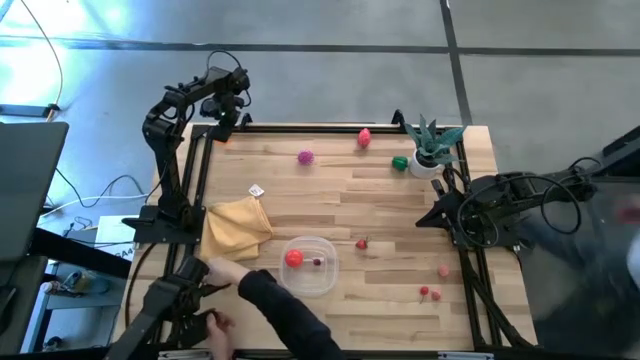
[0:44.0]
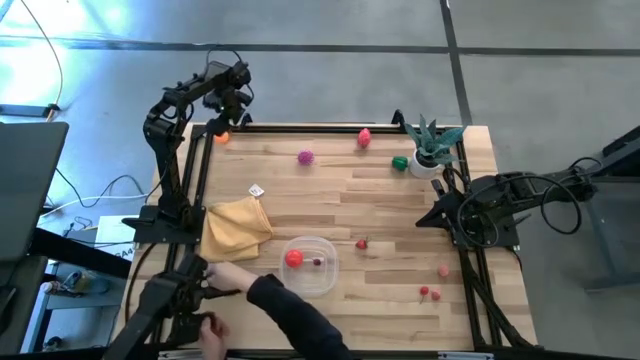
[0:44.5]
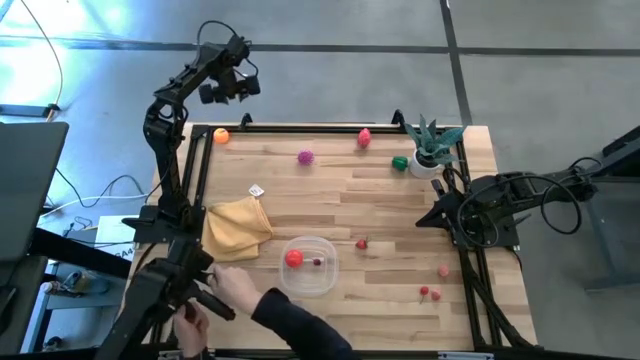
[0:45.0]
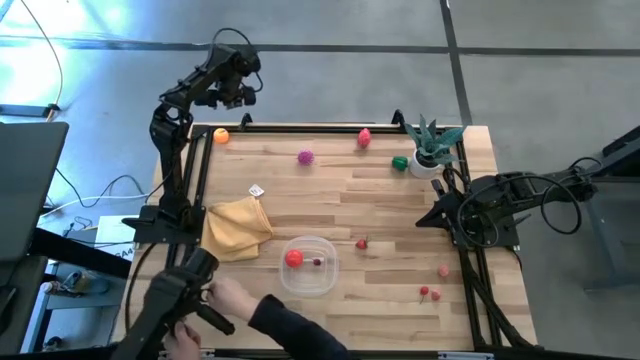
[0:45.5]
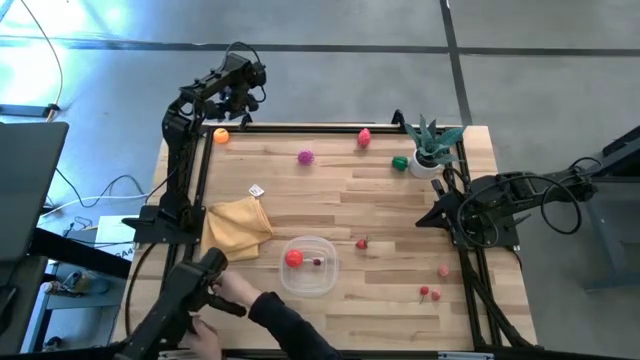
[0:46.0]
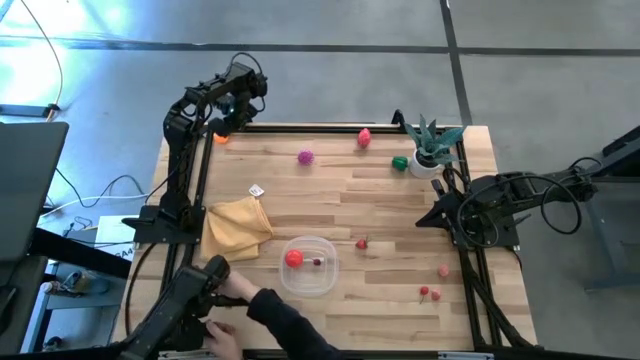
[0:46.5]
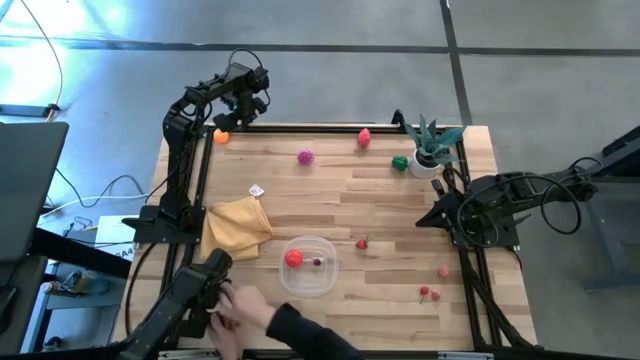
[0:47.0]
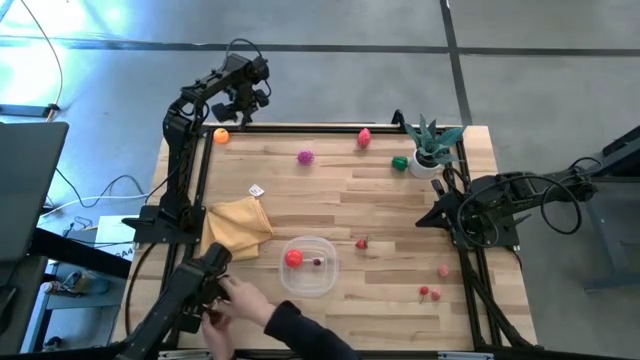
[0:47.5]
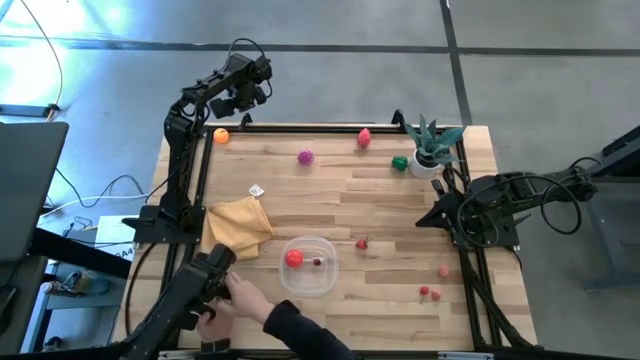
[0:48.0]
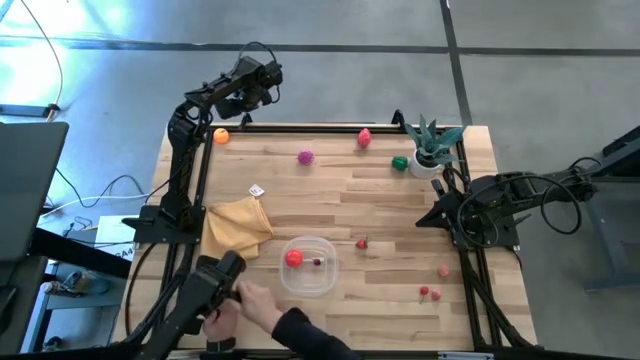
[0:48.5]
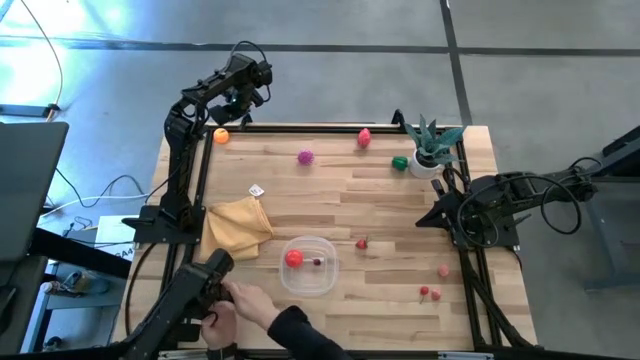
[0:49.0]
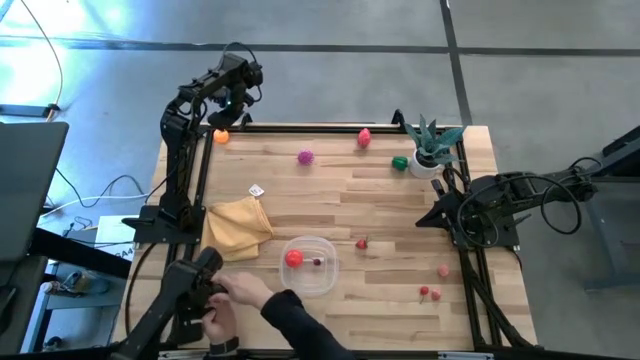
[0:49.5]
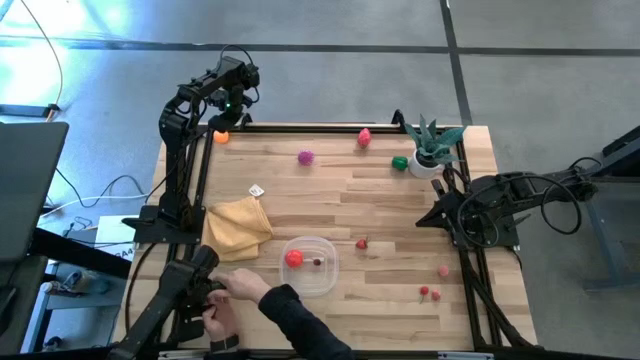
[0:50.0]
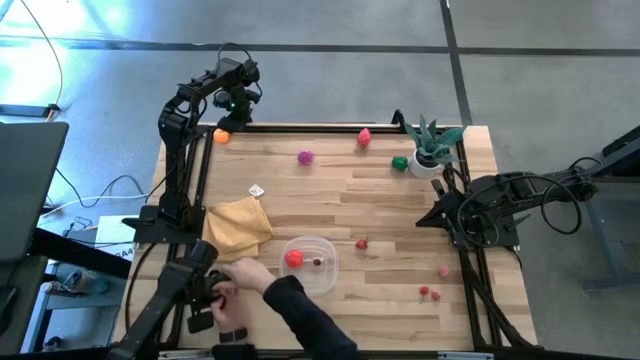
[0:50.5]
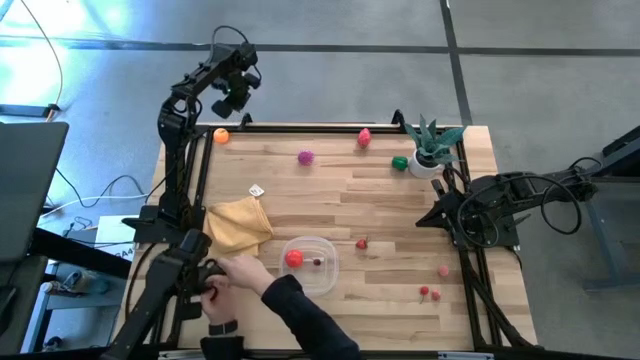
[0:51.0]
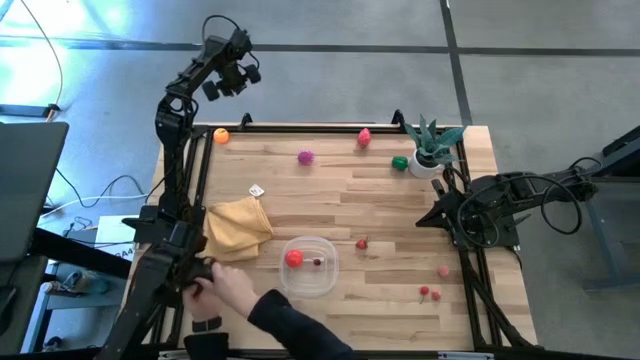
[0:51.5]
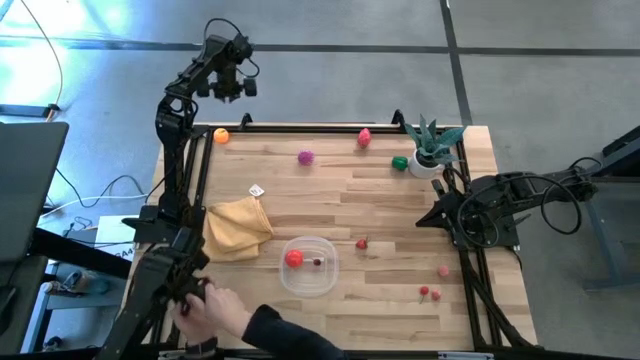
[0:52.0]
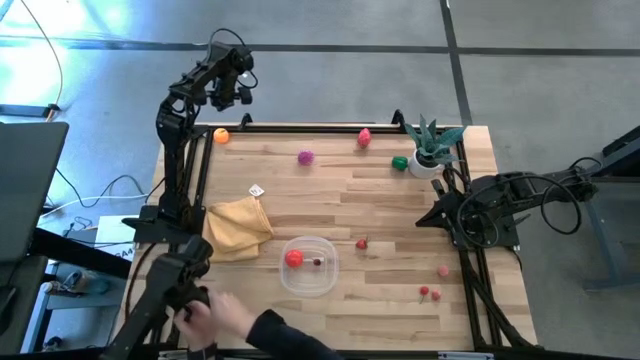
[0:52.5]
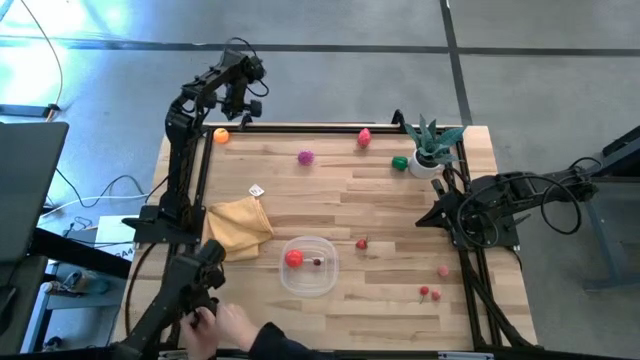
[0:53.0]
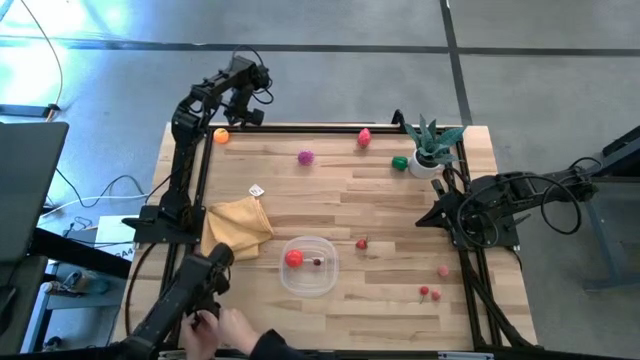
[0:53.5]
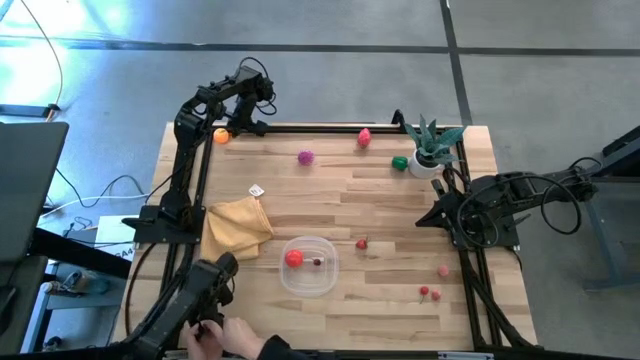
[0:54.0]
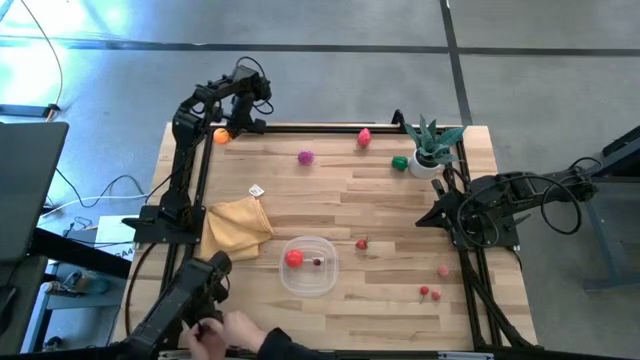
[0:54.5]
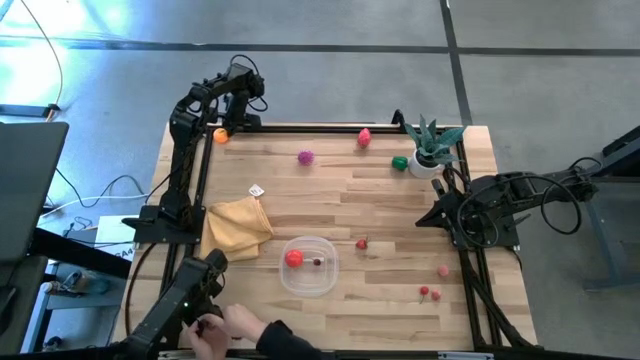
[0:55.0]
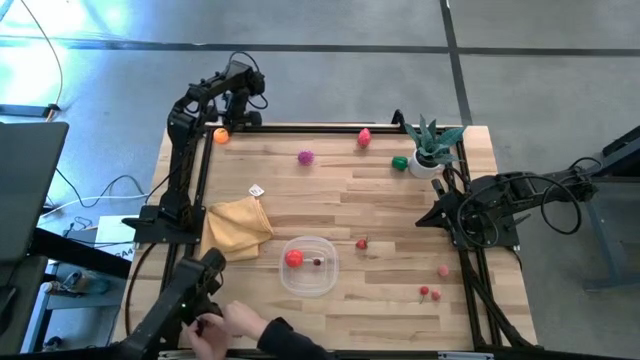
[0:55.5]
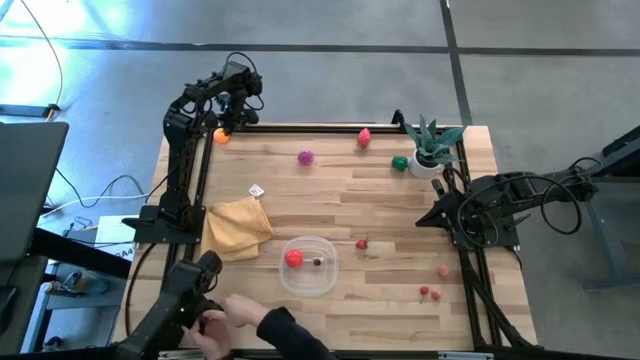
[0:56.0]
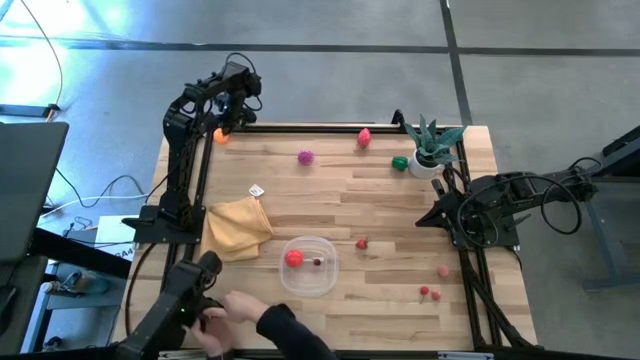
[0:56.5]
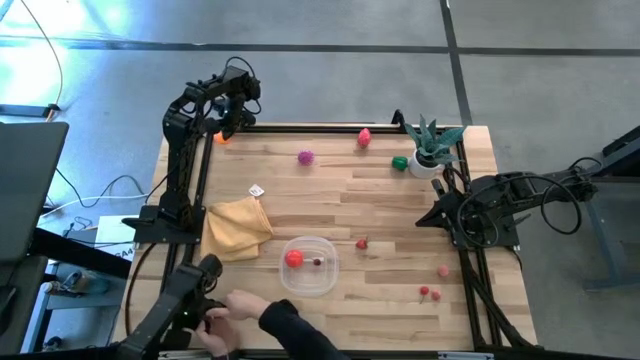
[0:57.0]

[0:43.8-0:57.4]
Task: Pick and placing Produce into tupperware
Put the orange into the transparent bin

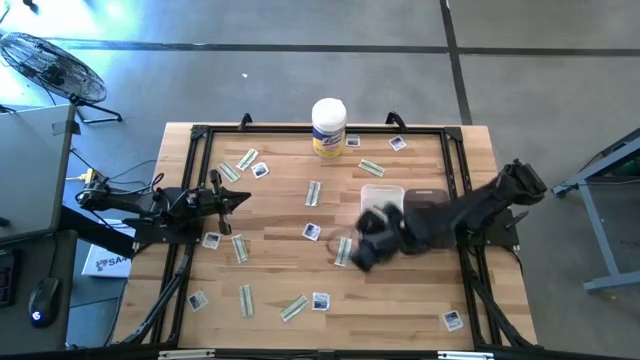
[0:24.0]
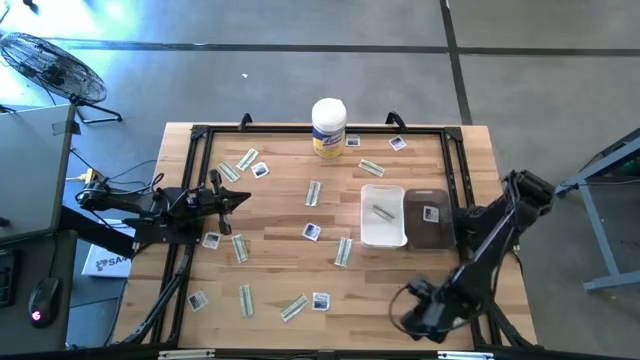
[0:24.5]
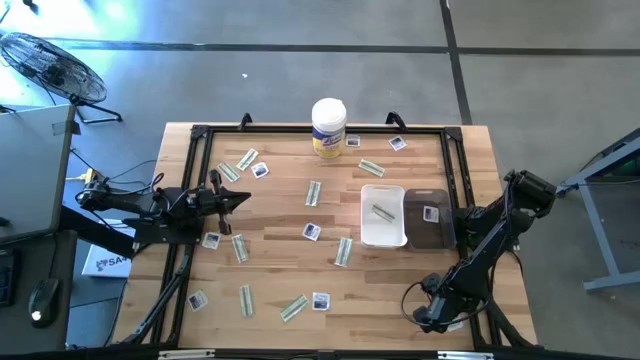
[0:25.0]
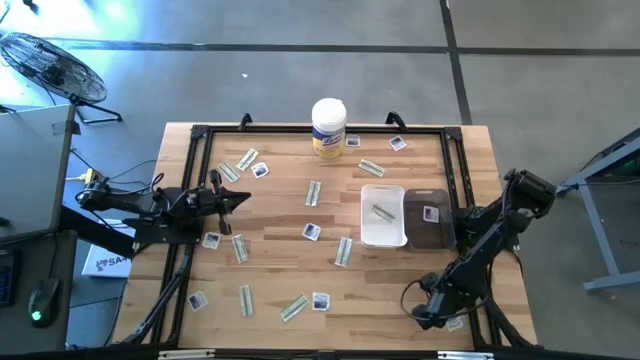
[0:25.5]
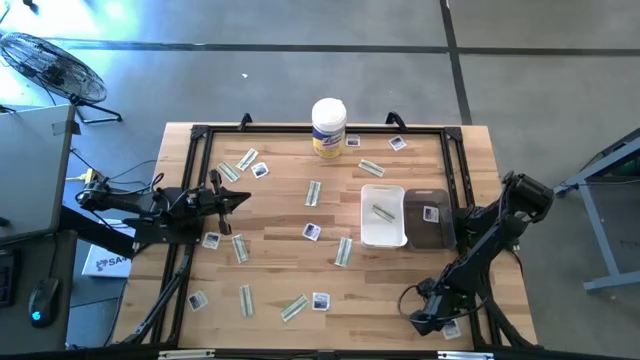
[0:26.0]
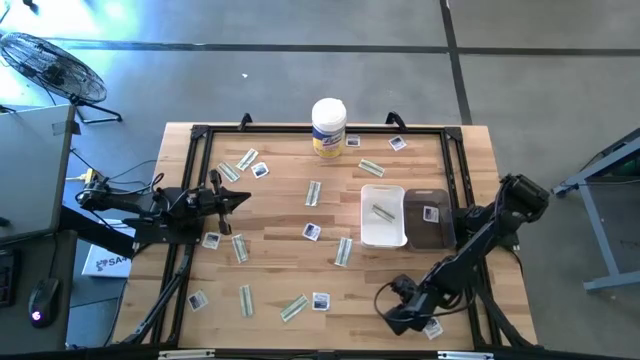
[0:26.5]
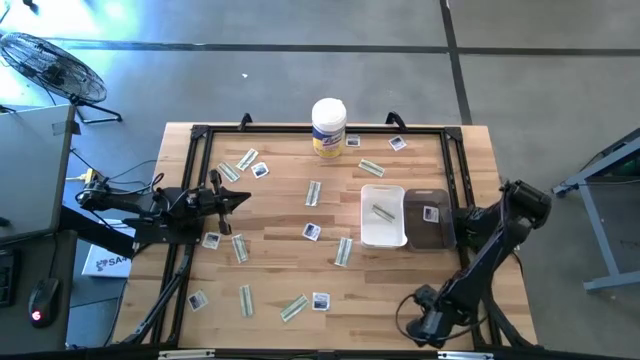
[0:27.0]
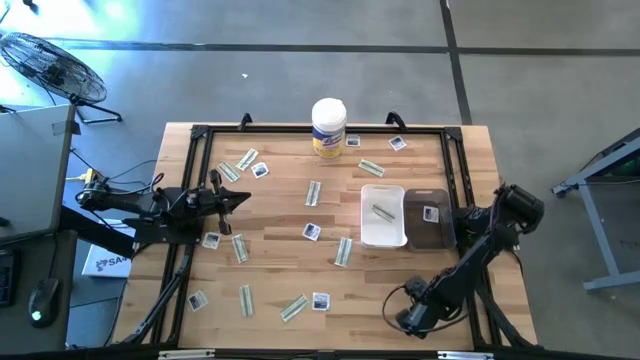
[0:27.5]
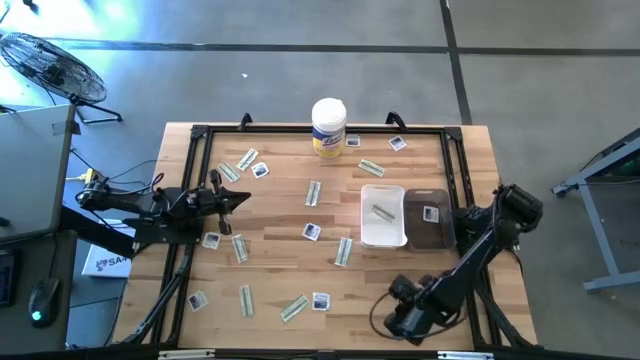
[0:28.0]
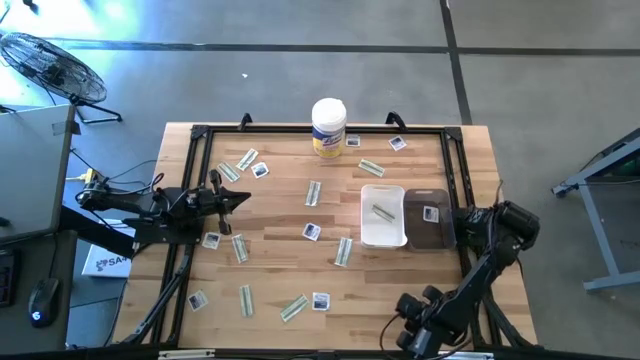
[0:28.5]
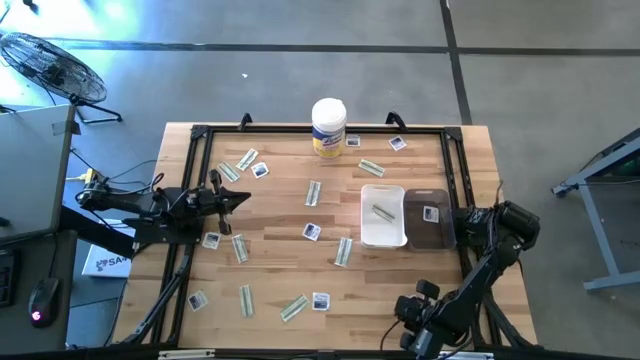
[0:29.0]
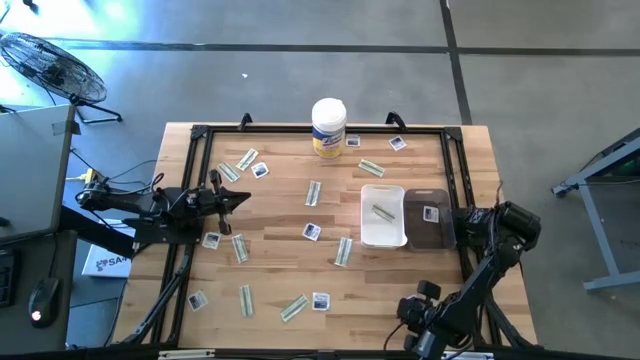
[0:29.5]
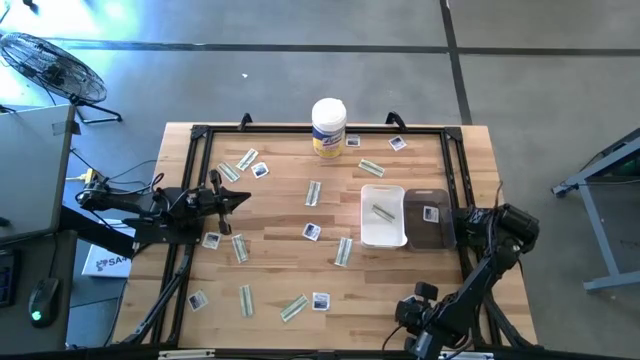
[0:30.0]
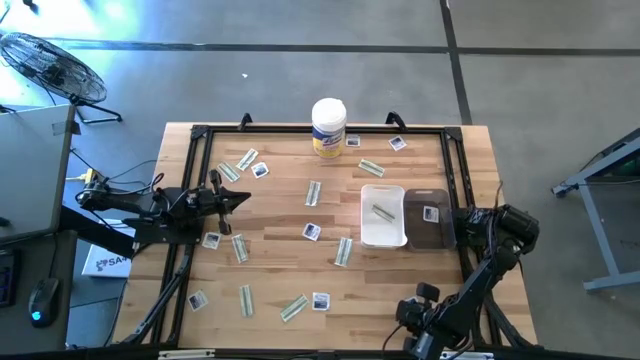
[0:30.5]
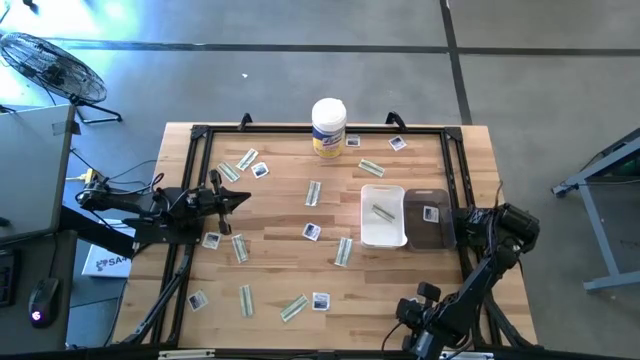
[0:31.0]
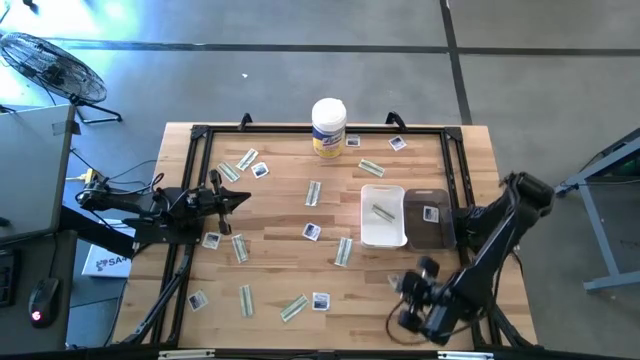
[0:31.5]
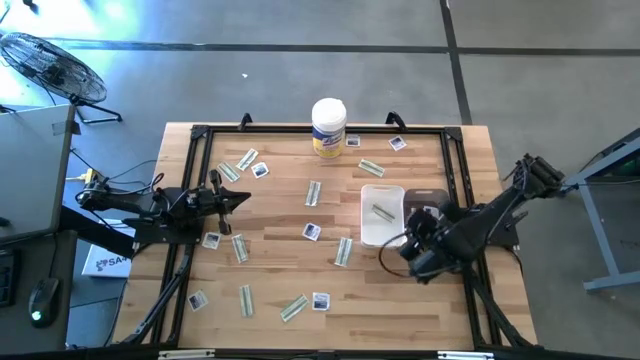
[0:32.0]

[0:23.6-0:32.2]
Task: Pick & Place First Aid Supplies
Put the blue alcohol pad into the black bin
